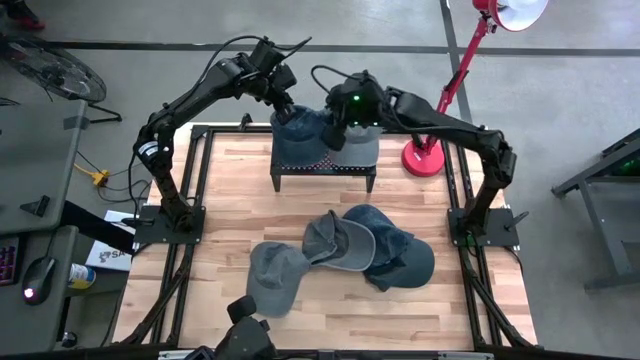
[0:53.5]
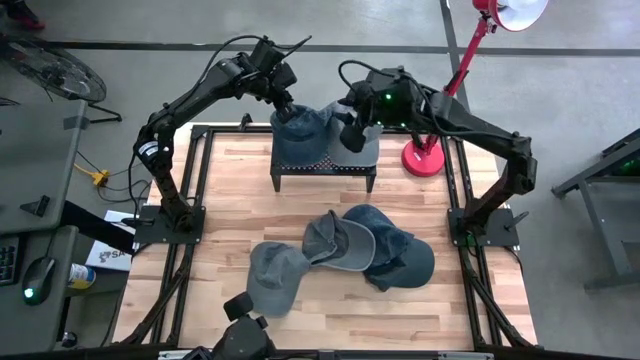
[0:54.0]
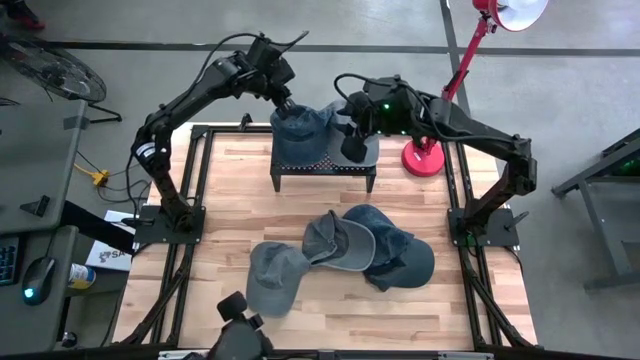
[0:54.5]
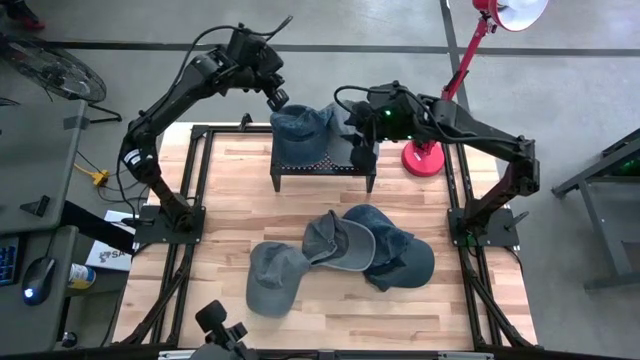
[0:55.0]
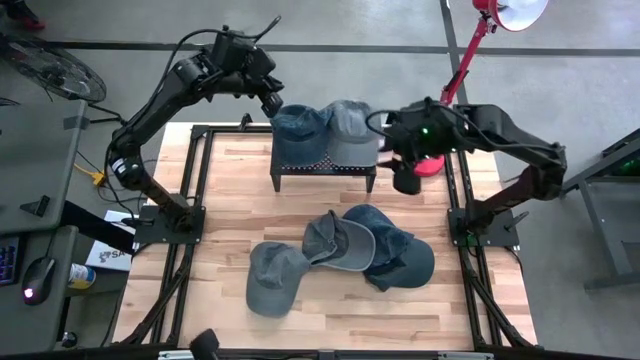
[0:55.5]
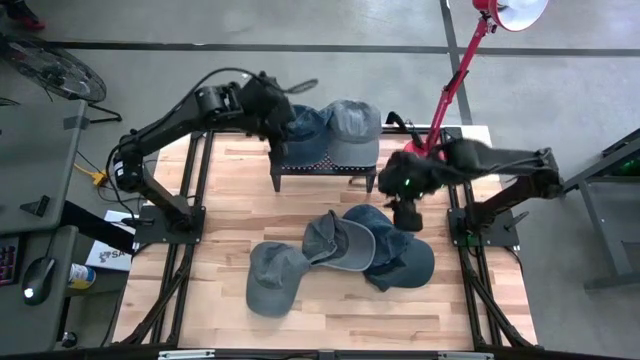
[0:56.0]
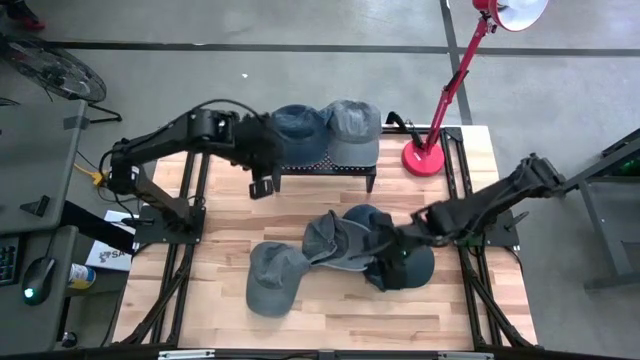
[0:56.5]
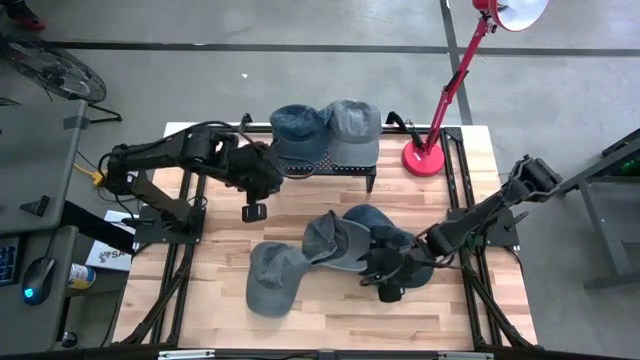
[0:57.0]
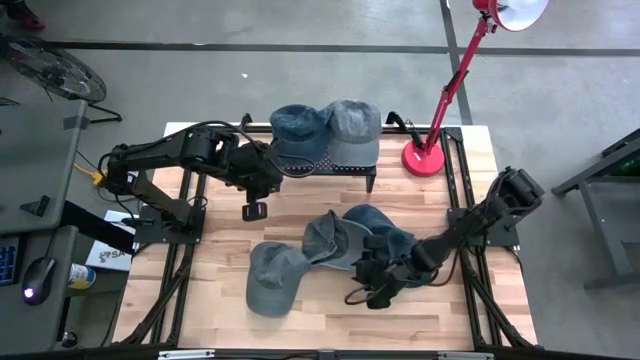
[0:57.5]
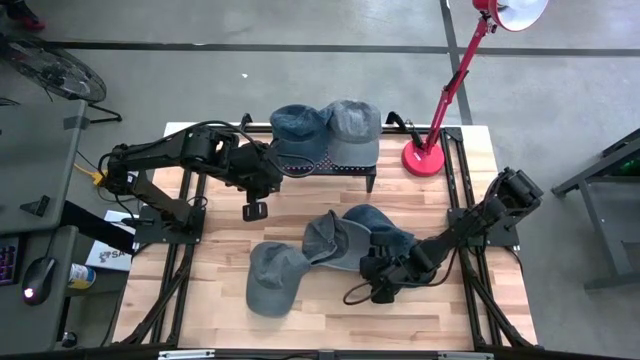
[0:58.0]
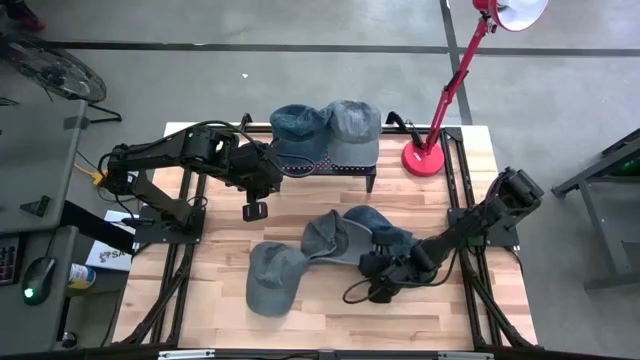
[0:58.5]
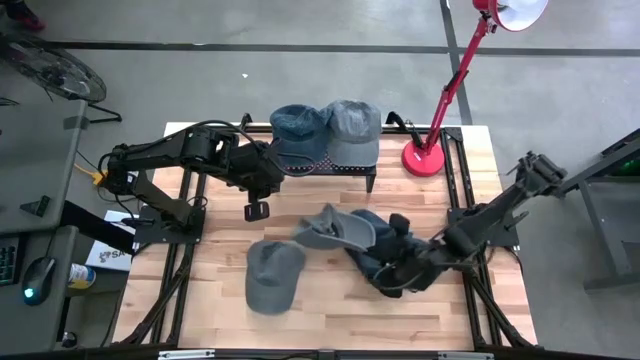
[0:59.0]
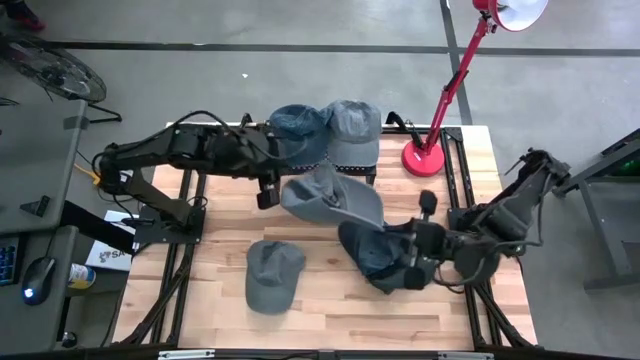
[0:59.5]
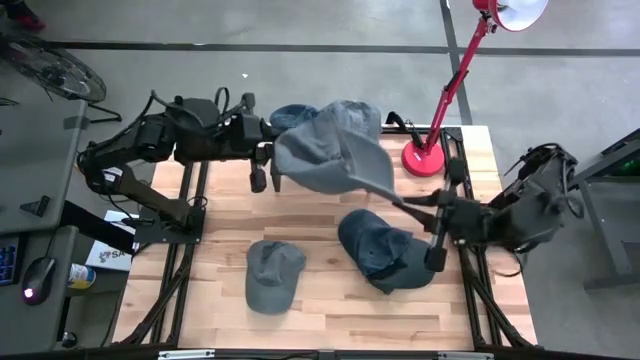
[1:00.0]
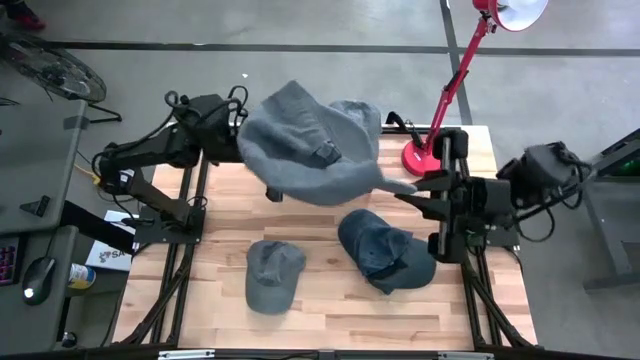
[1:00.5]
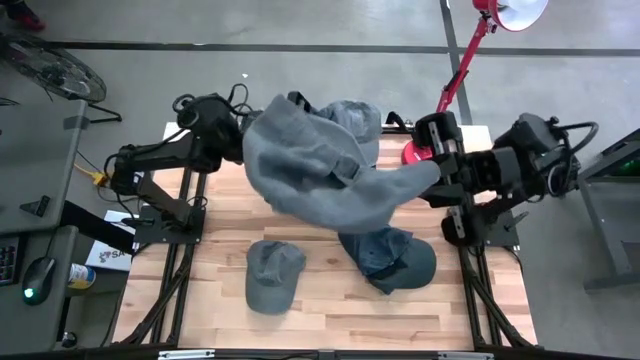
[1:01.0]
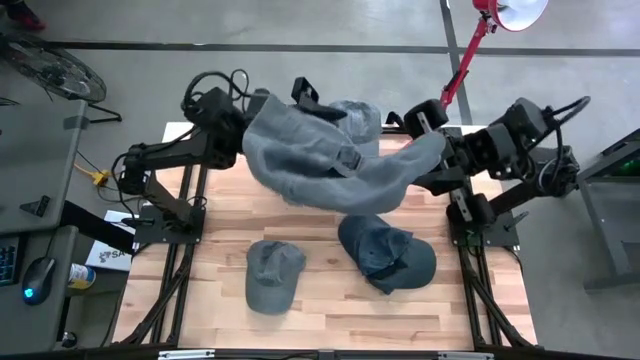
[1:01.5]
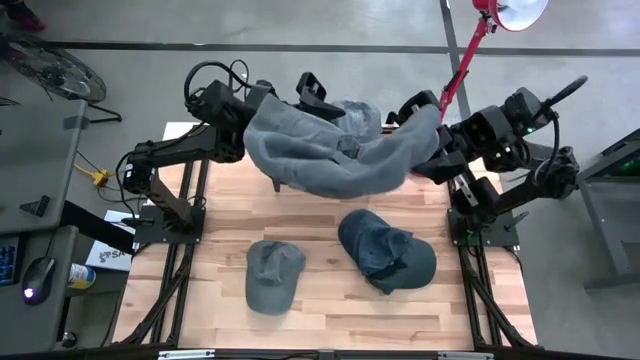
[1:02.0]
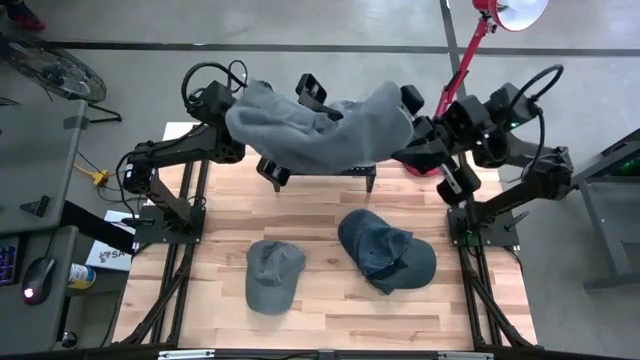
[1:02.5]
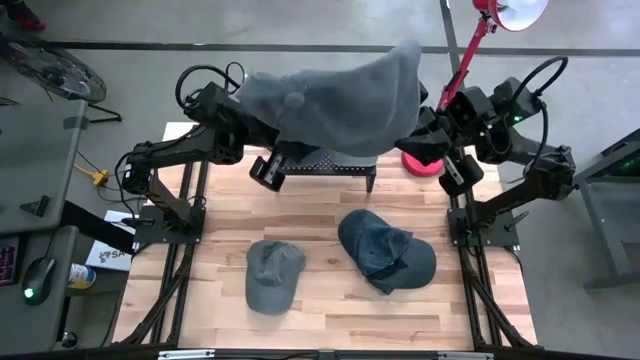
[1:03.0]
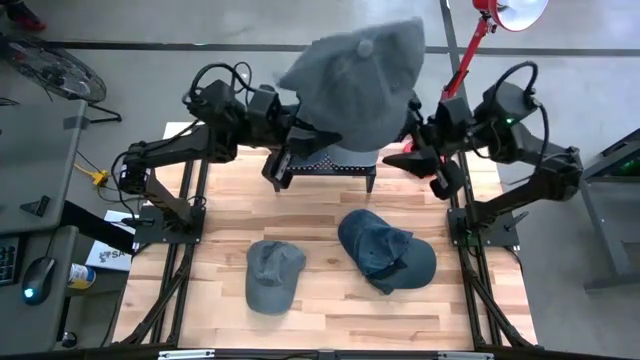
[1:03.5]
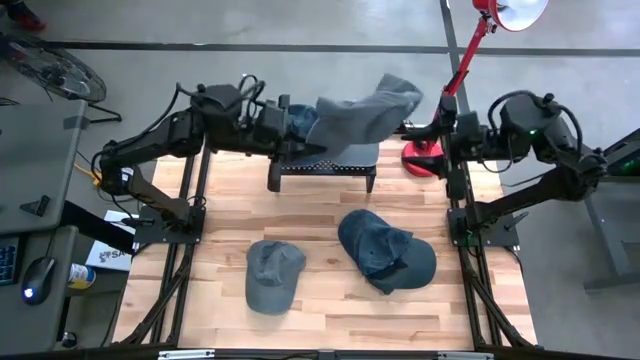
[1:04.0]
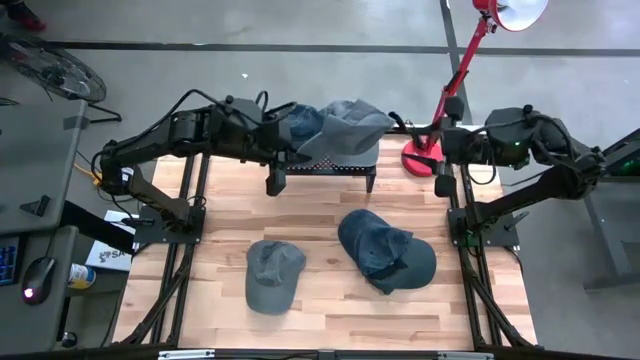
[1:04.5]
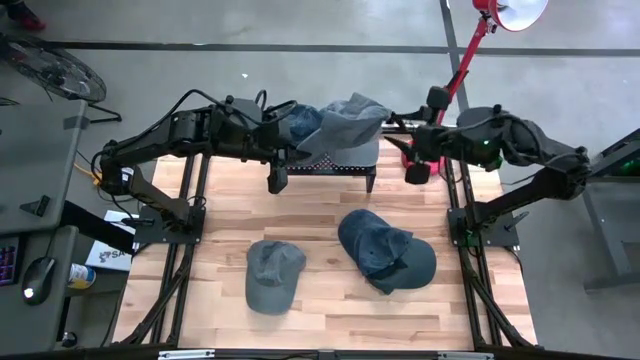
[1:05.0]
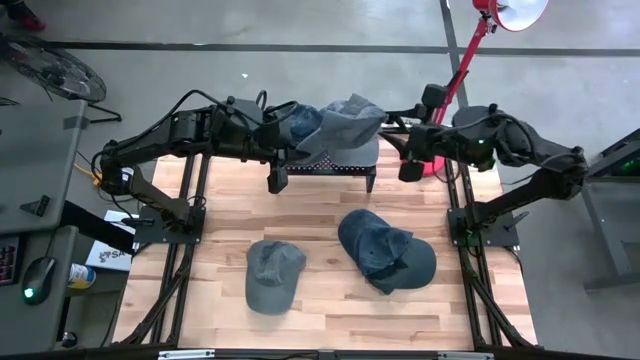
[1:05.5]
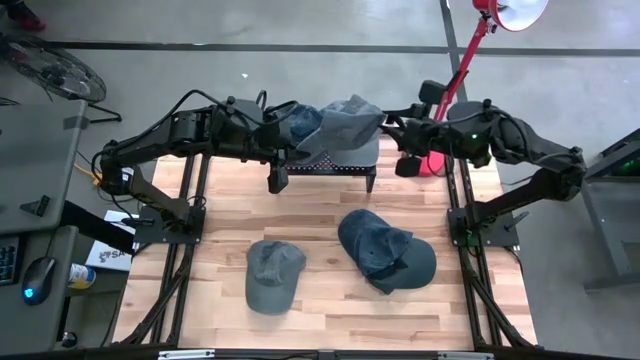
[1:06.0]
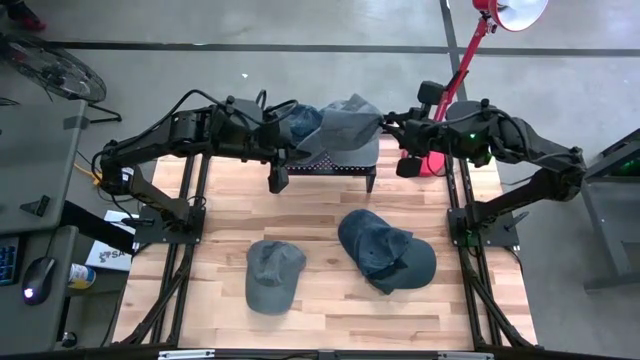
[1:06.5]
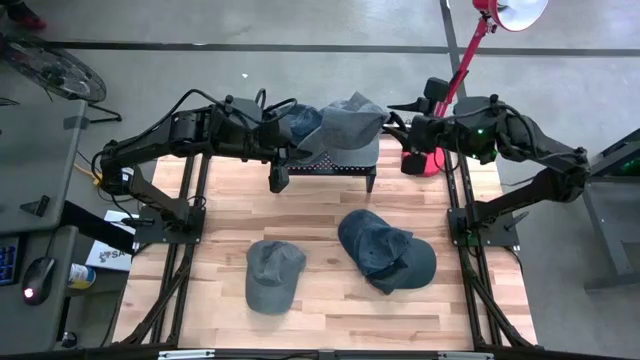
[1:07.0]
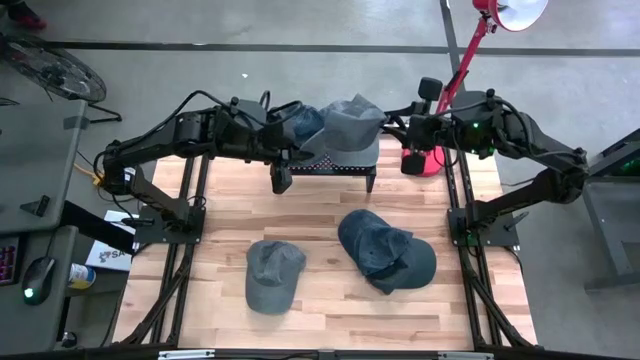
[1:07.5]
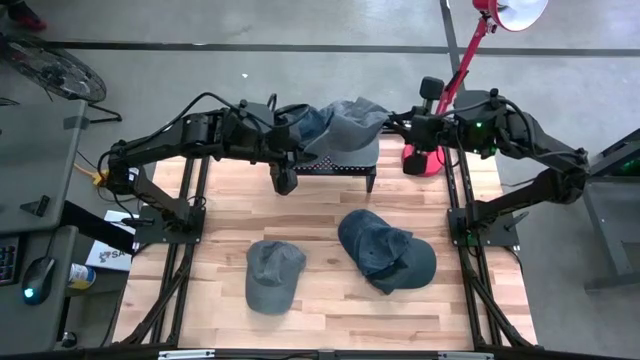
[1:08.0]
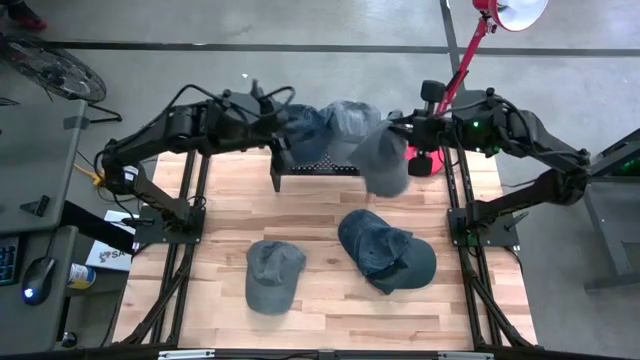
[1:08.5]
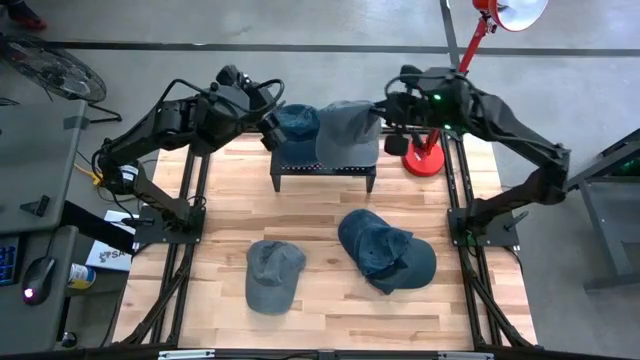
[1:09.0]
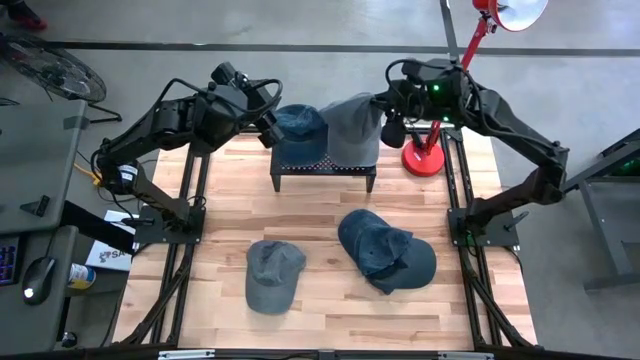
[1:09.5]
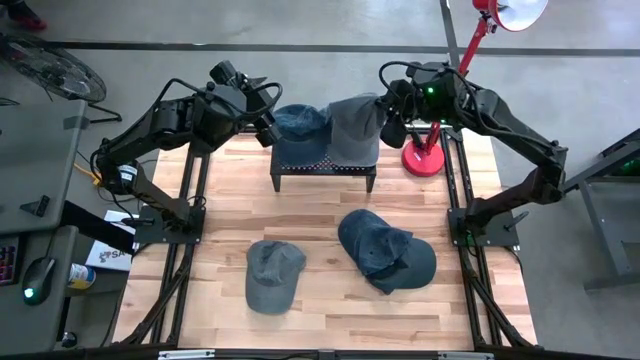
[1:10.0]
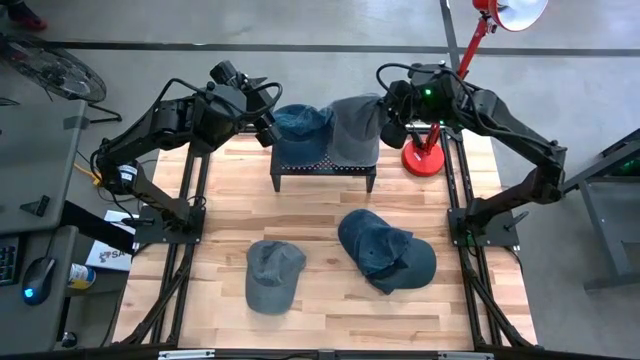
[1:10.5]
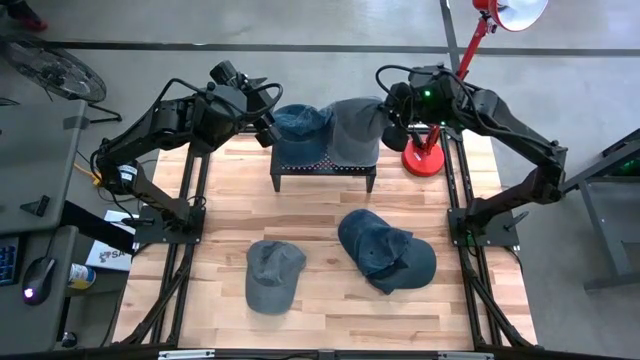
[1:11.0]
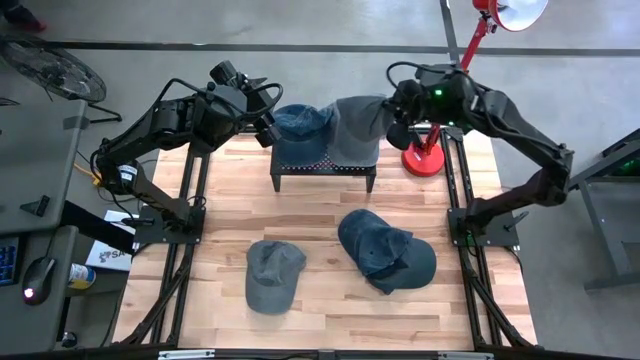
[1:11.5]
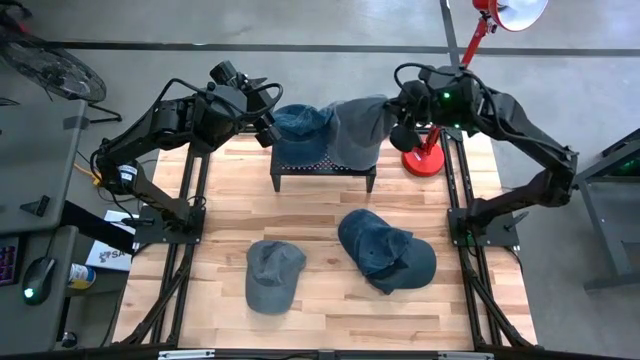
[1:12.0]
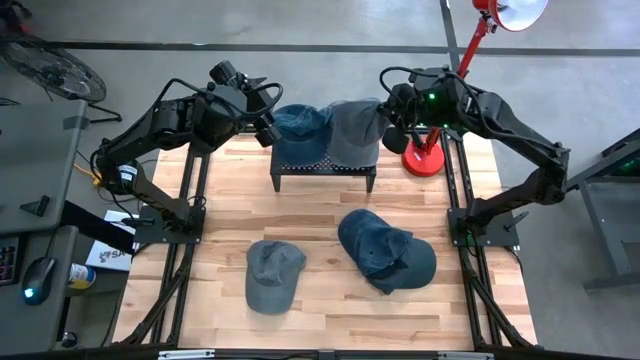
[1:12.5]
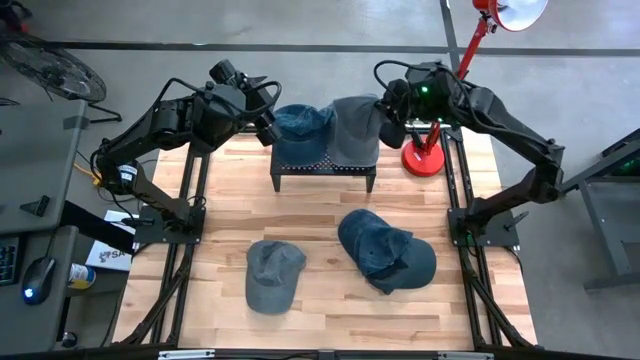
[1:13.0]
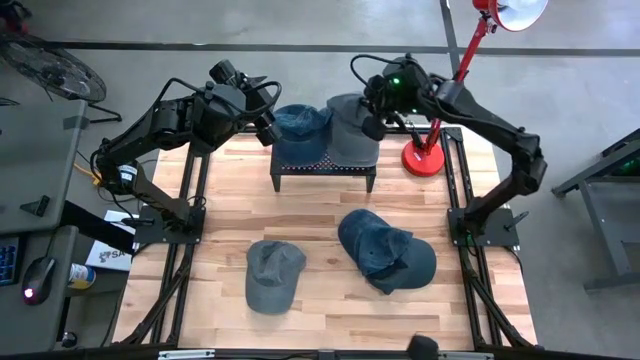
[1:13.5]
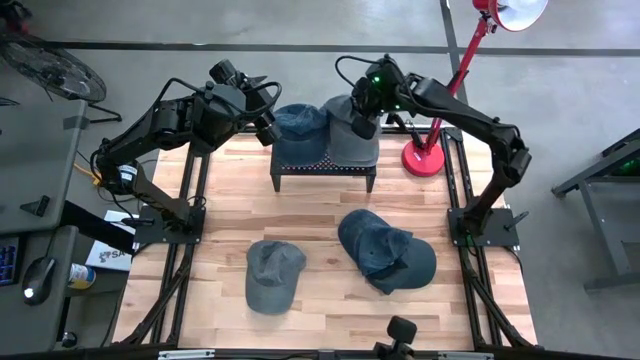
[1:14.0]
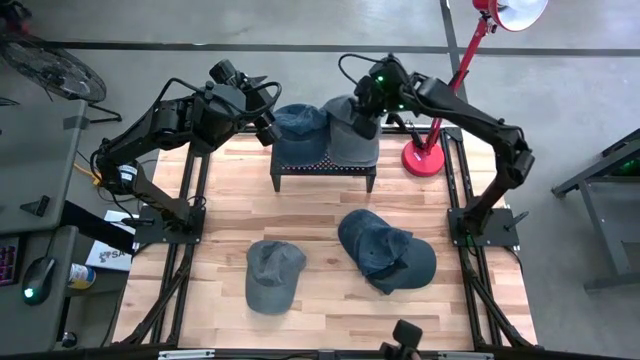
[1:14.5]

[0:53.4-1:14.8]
Task: Pick & Place hat
Stack the top gray cap on the gray cap on the shelf
